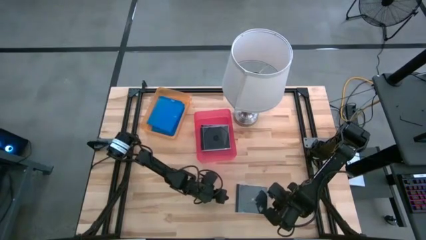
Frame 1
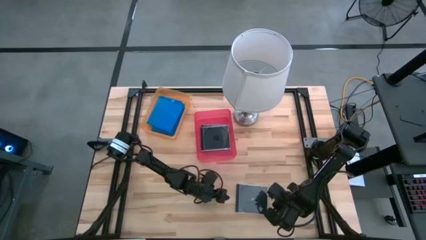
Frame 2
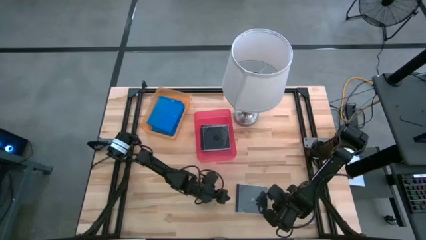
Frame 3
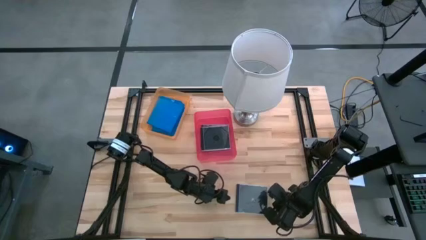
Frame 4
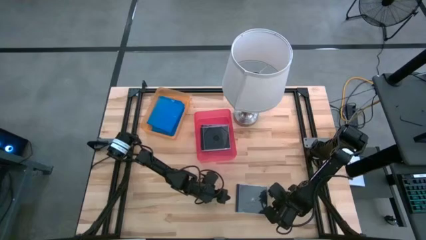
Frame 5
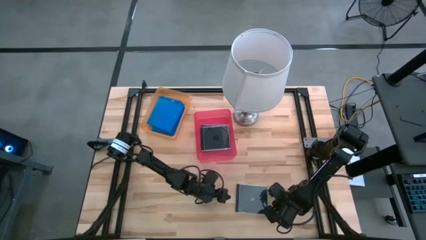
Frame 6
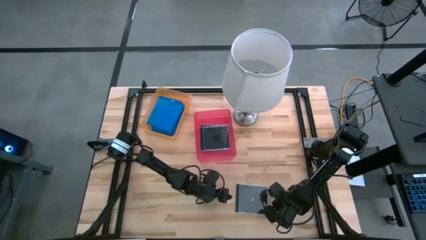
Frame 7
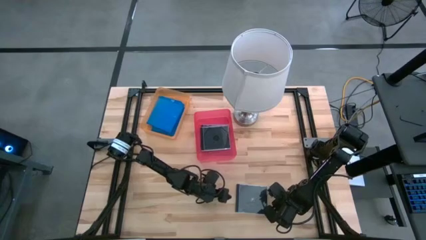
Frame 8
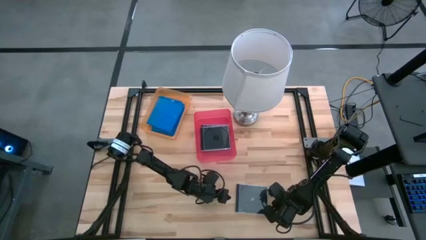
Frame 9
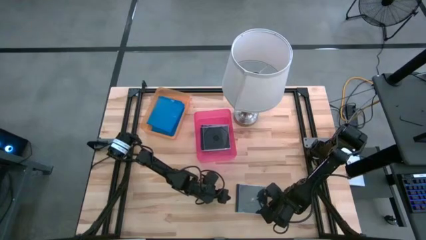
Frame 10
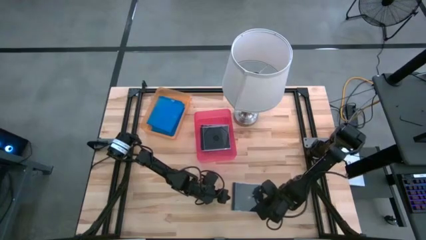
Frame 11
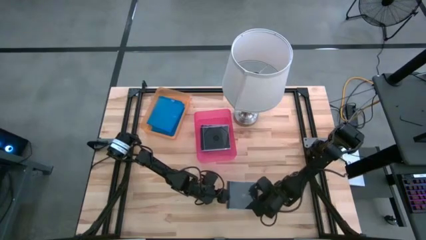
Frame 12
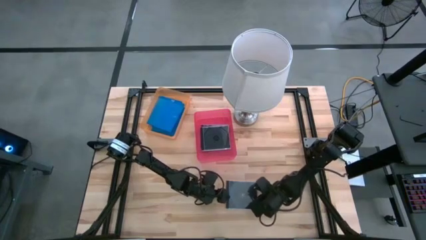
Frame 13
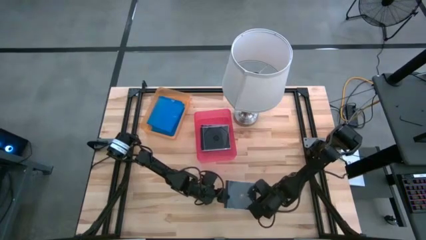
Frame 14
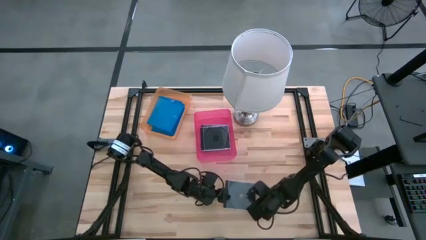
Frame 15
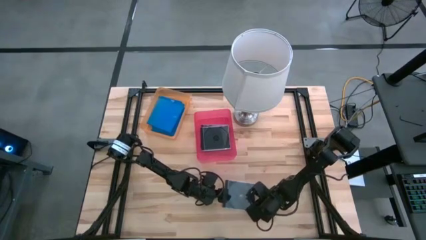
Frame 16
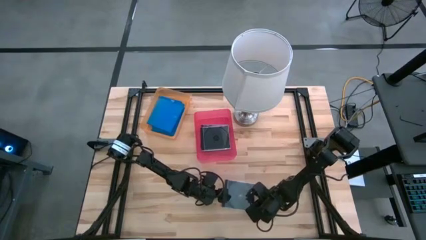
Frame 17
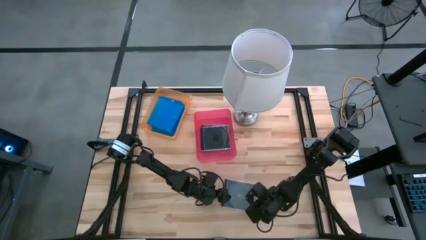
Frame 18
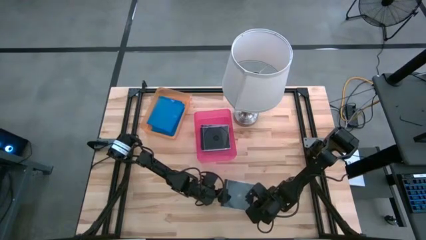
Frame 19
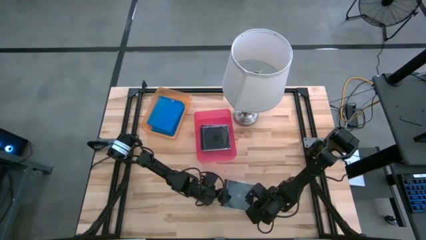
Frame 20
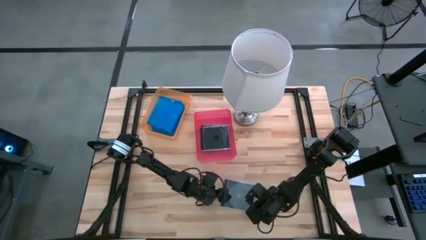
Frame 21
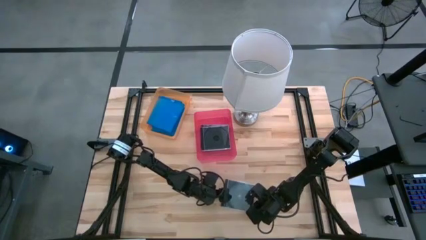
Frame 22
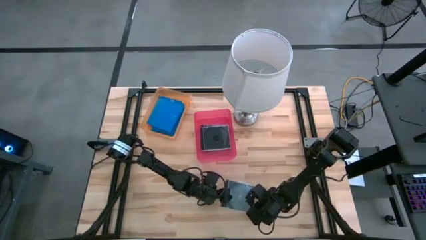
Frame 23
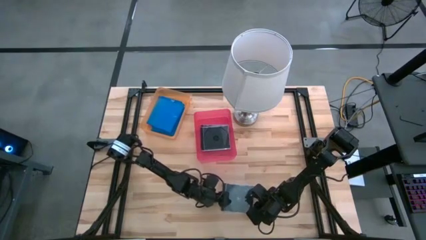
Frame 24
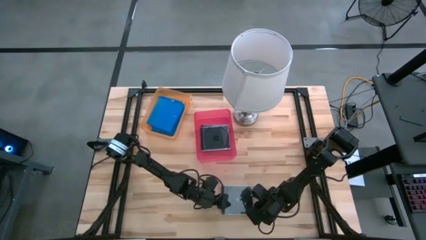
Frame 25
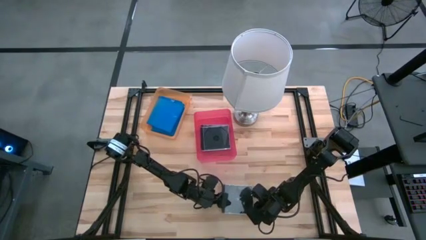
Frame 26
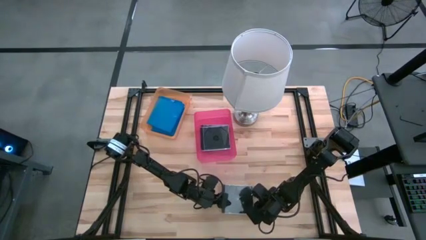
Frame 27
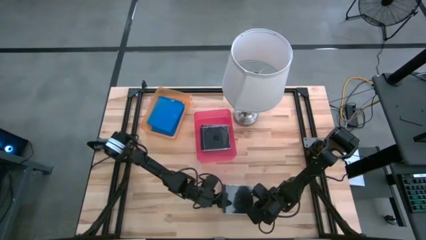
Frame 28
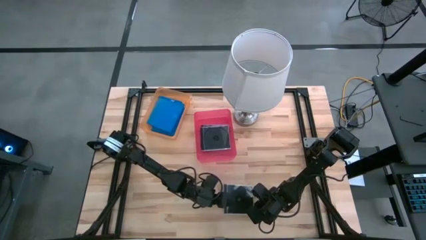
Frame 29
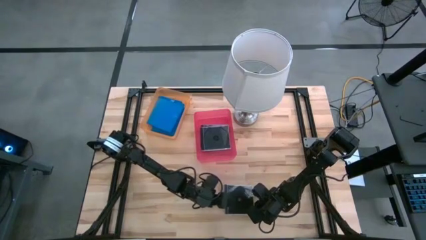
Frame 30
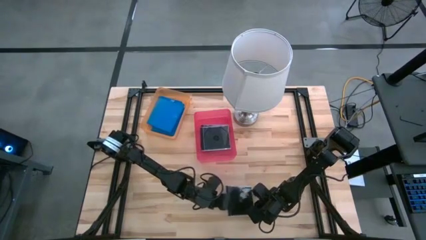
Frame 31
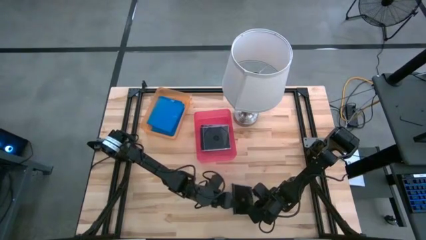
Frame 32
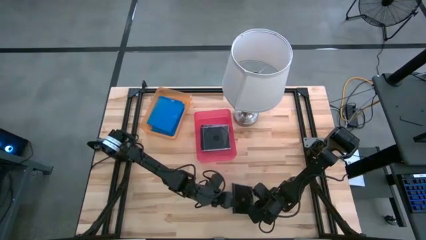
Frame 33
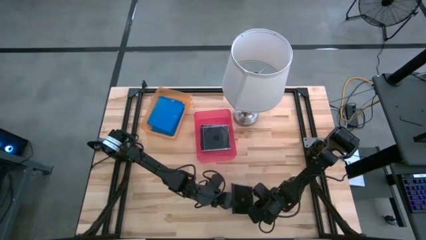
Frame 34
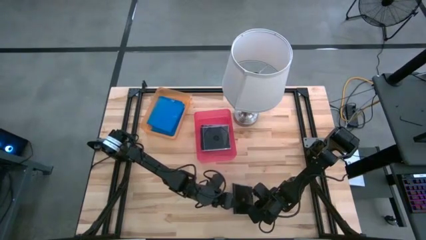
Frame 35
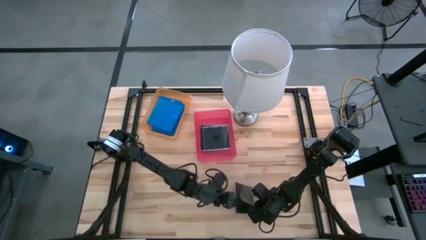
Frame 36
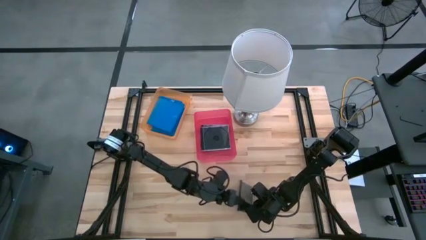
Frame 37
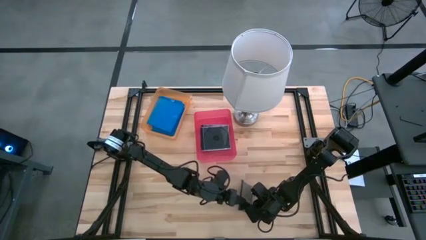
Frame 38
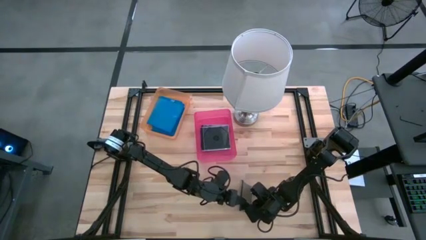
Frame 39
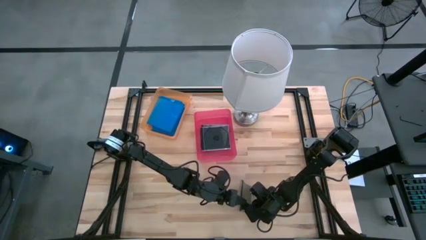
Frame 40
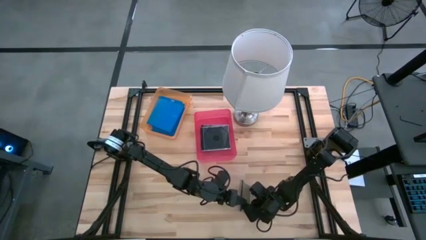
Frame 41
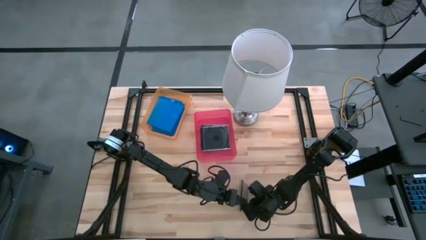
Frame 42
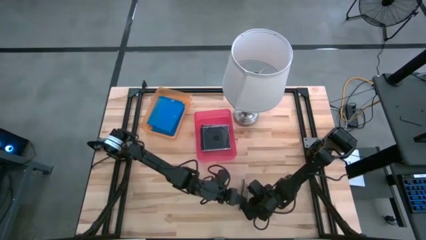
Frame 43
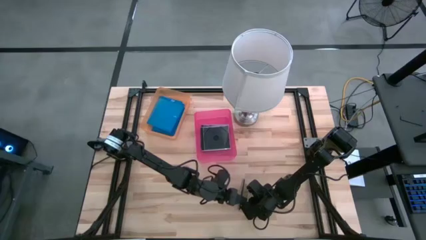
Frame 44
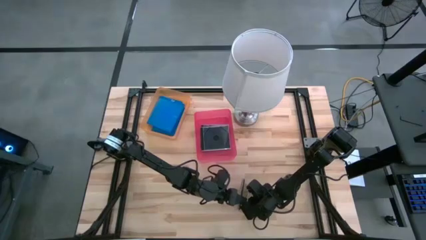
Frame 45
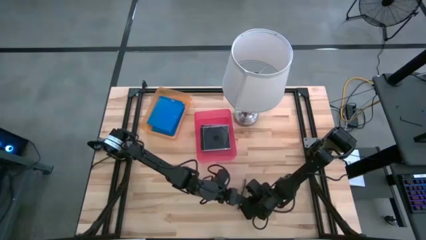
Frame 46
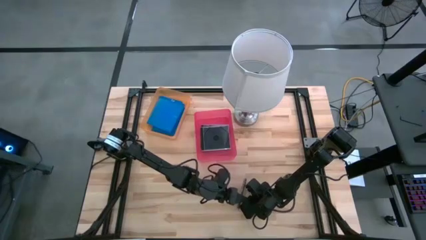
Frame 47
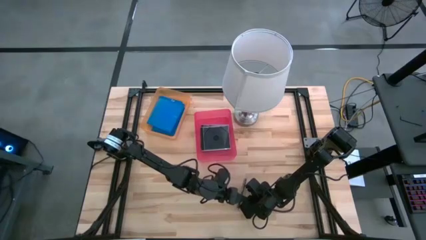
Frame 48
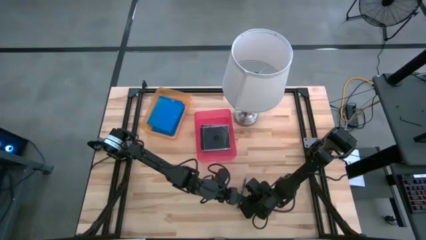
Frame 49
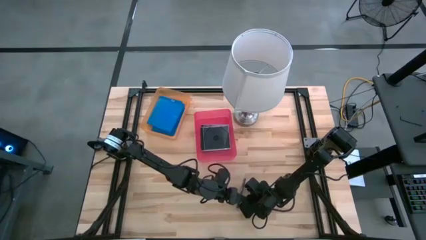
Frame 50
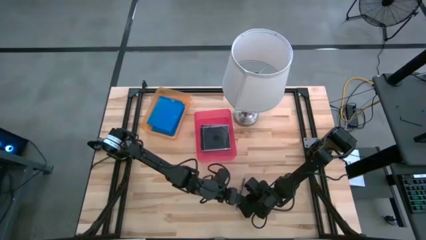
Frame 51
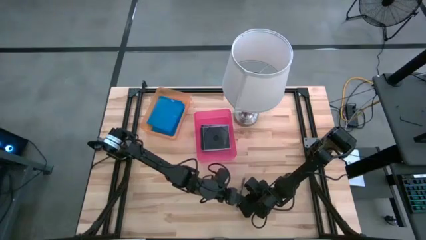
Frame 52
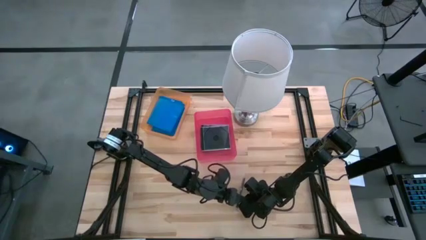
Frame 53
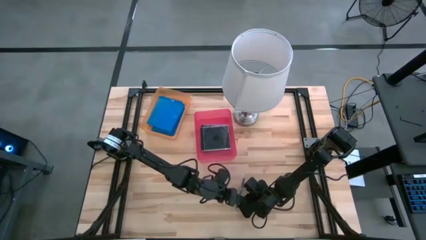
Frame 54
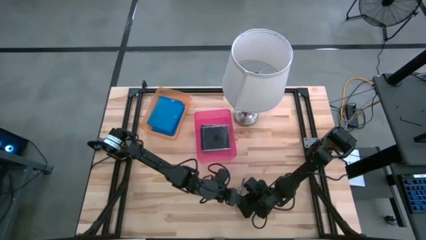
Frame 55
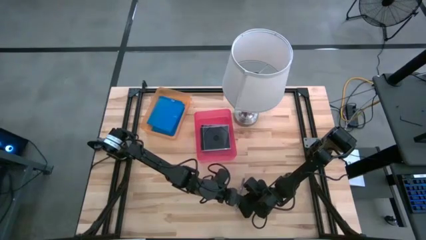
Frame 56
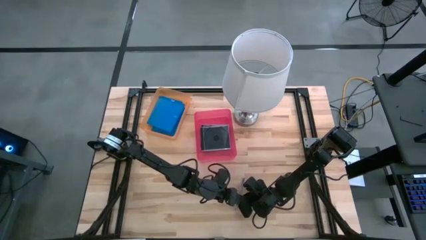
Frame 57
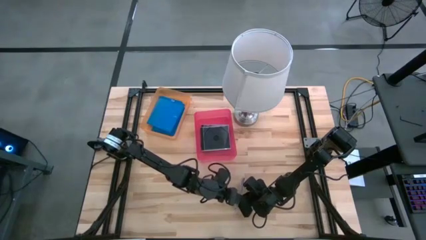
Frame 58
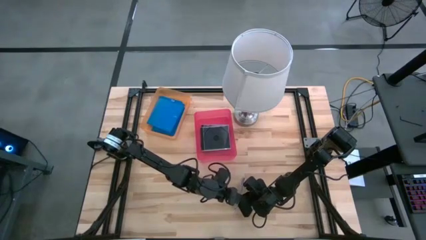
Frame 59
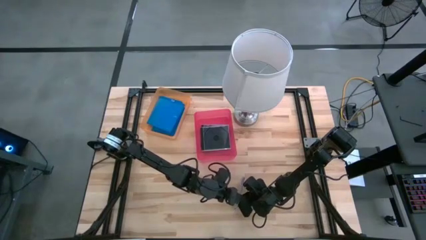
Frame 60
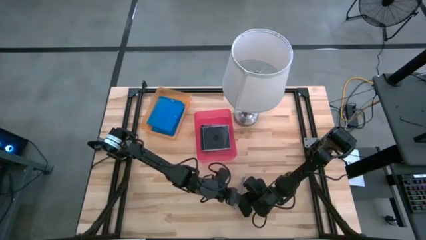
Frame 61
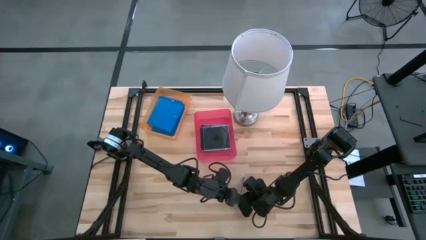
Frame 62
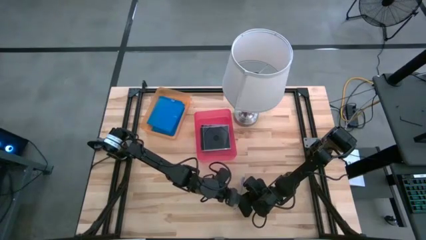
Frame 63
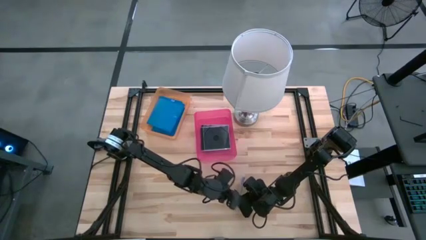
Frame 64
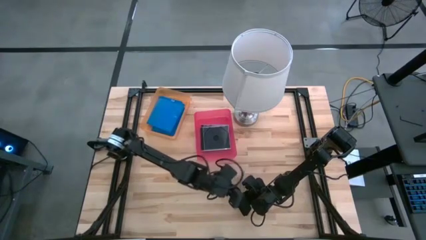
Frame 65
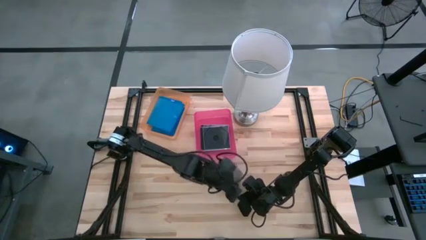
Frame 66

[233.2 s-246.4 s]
Task: Pick & place jewel cases by type
Put the black cd case into the pink bin
